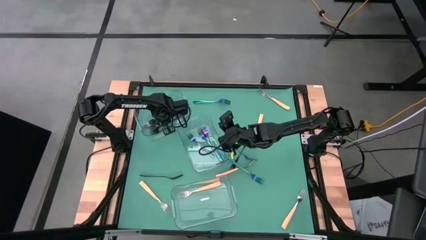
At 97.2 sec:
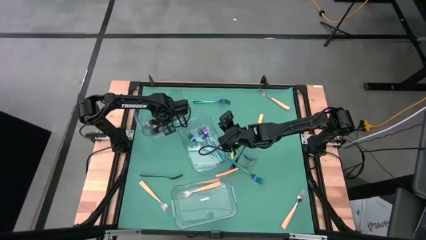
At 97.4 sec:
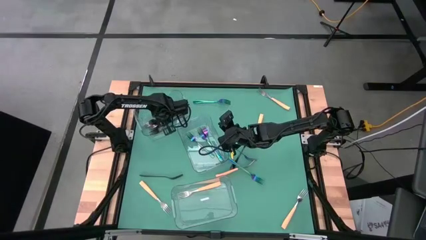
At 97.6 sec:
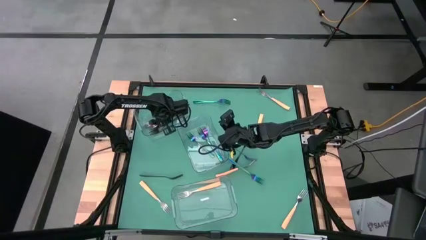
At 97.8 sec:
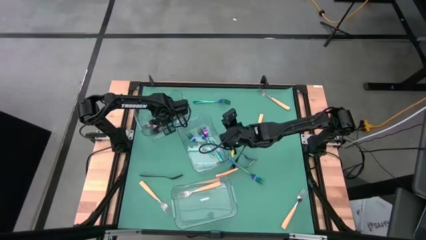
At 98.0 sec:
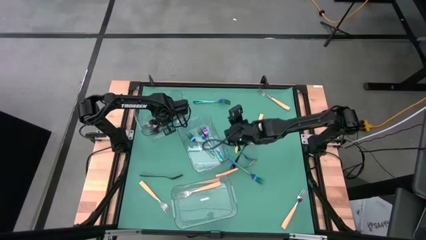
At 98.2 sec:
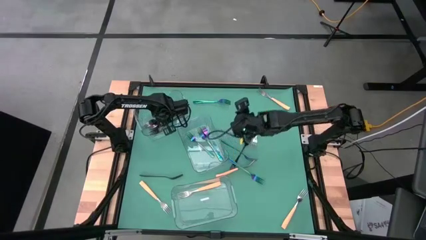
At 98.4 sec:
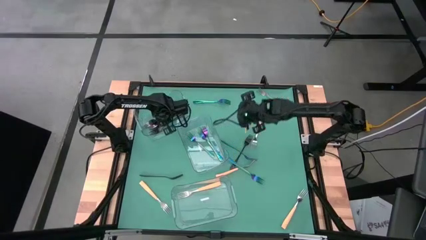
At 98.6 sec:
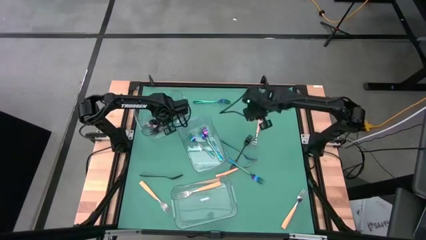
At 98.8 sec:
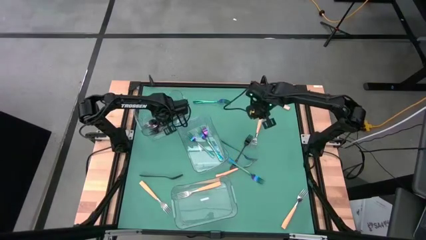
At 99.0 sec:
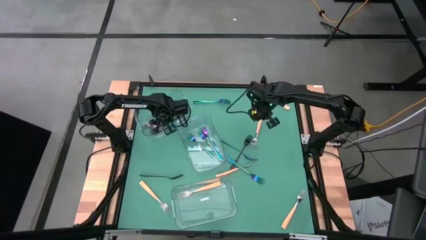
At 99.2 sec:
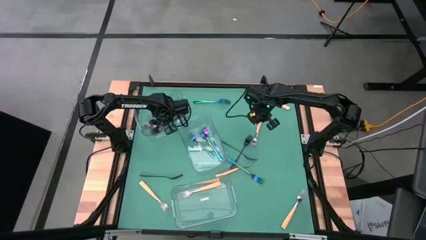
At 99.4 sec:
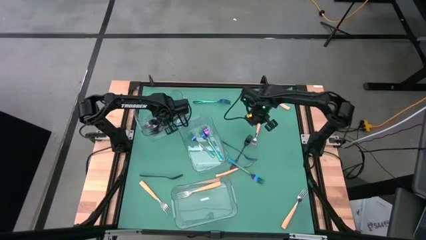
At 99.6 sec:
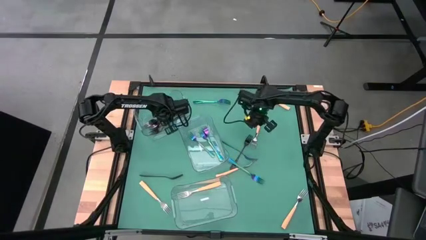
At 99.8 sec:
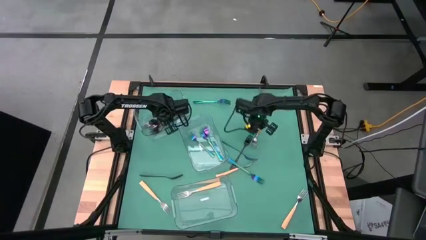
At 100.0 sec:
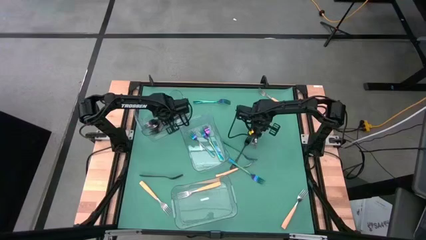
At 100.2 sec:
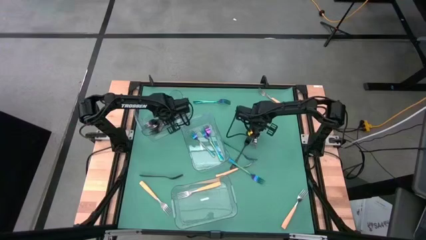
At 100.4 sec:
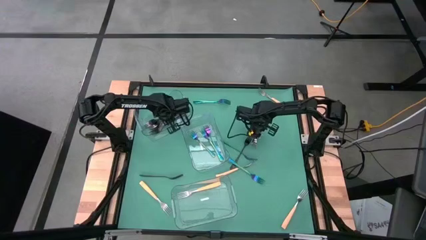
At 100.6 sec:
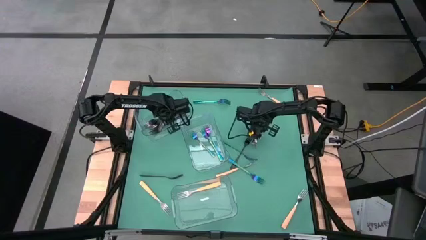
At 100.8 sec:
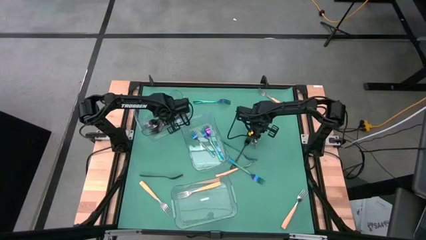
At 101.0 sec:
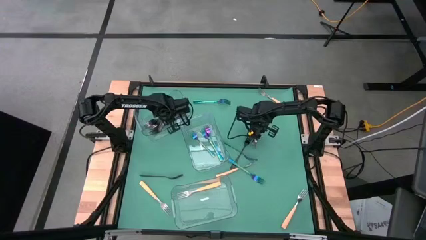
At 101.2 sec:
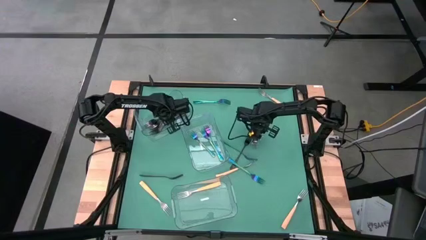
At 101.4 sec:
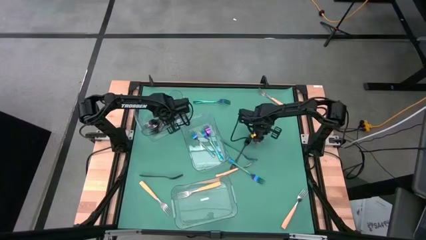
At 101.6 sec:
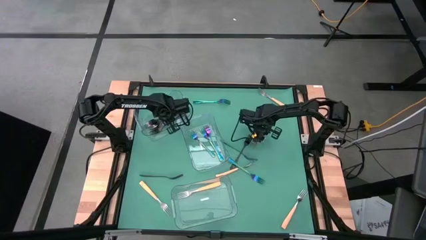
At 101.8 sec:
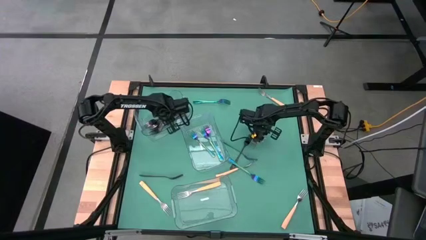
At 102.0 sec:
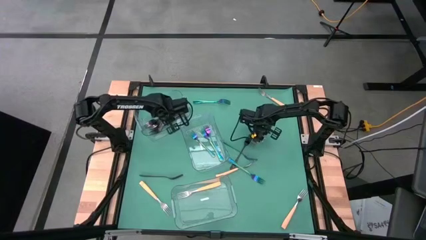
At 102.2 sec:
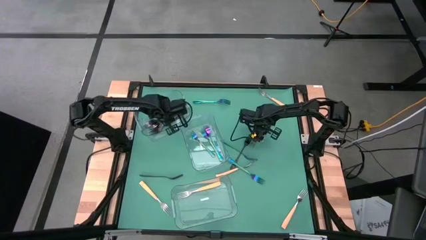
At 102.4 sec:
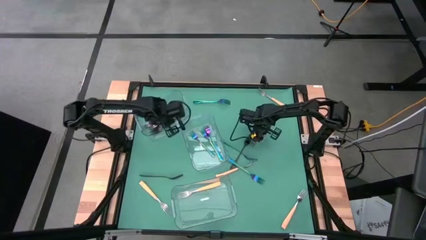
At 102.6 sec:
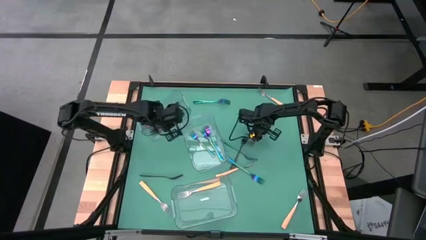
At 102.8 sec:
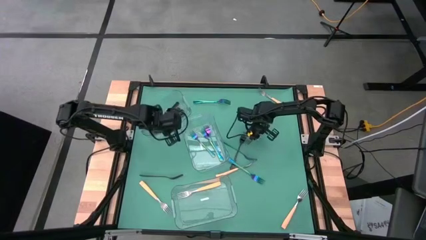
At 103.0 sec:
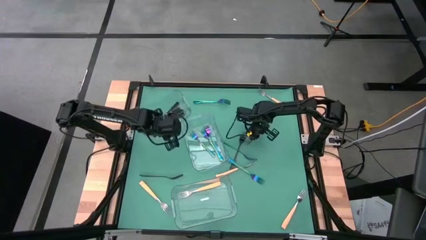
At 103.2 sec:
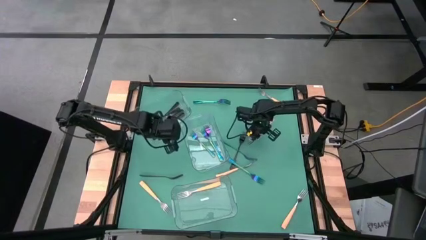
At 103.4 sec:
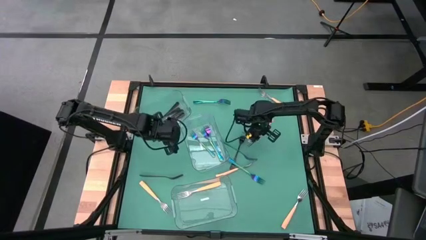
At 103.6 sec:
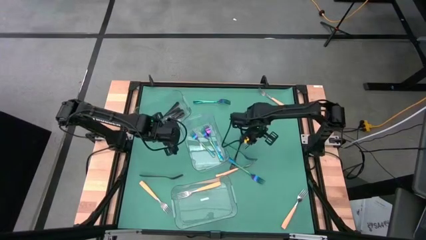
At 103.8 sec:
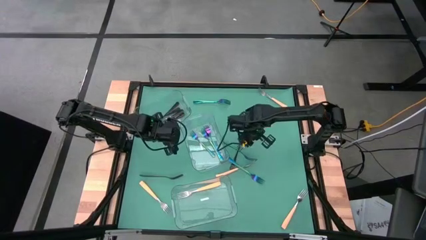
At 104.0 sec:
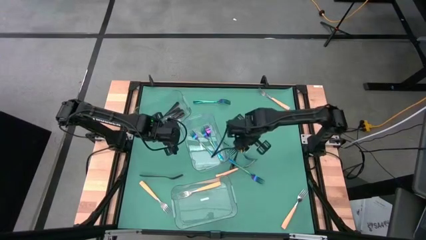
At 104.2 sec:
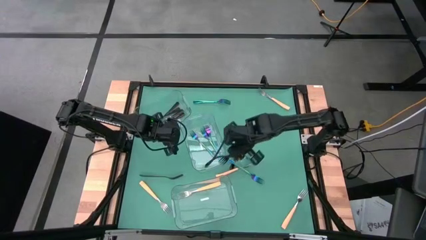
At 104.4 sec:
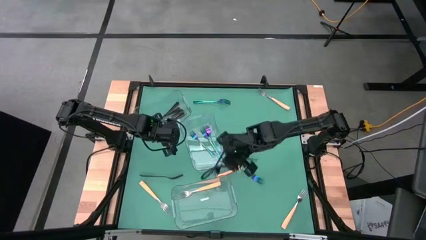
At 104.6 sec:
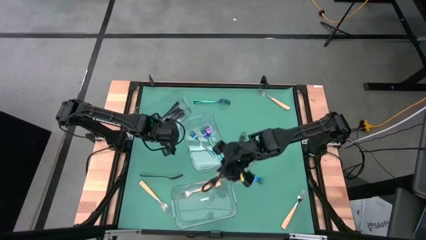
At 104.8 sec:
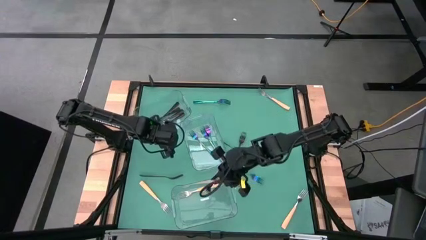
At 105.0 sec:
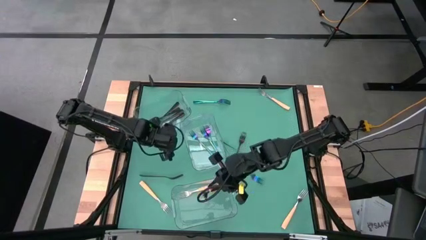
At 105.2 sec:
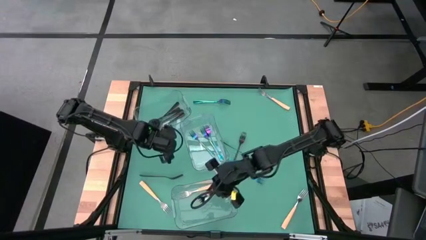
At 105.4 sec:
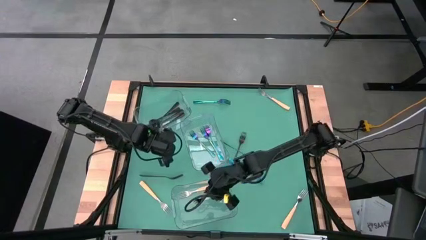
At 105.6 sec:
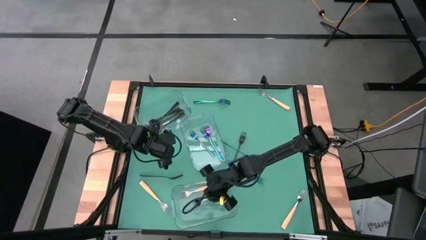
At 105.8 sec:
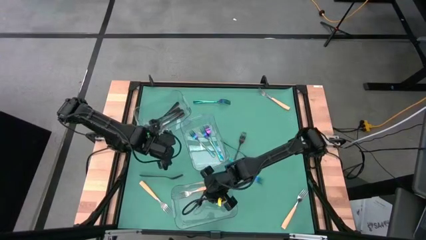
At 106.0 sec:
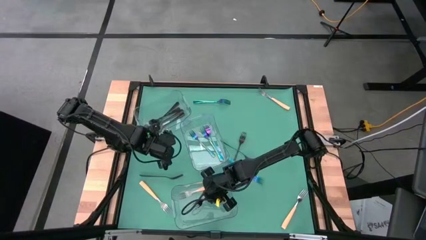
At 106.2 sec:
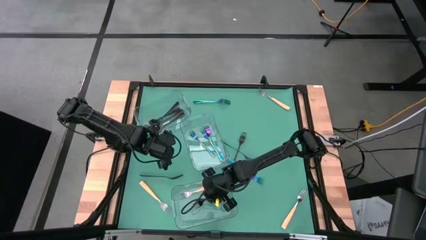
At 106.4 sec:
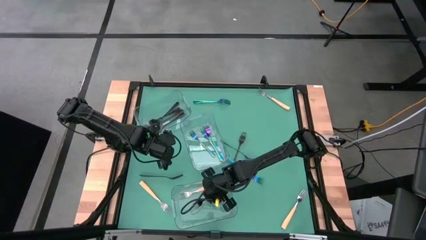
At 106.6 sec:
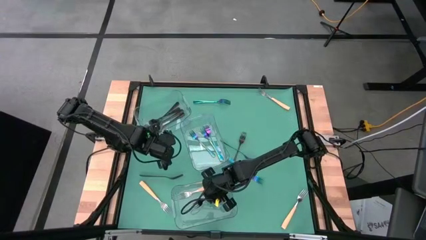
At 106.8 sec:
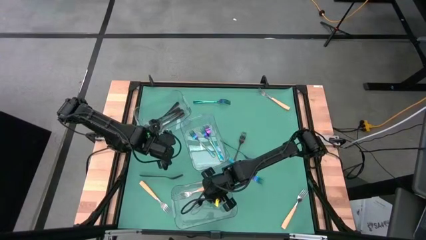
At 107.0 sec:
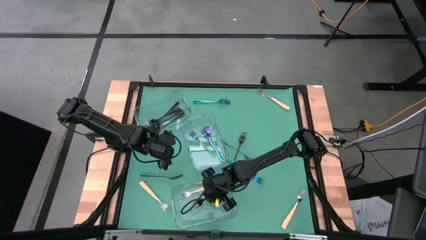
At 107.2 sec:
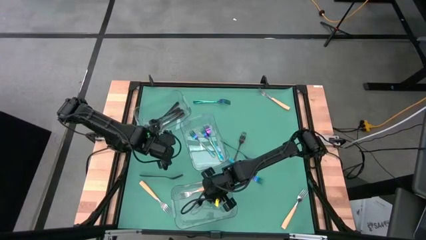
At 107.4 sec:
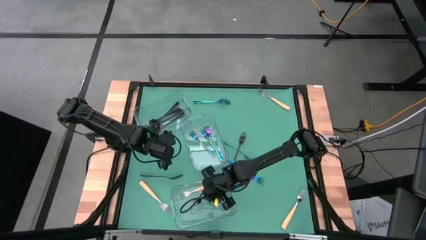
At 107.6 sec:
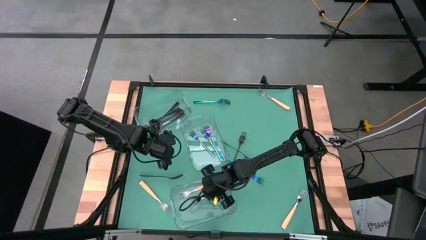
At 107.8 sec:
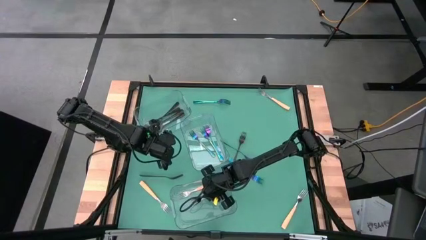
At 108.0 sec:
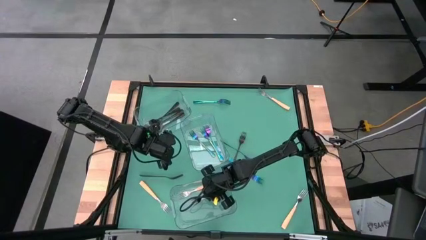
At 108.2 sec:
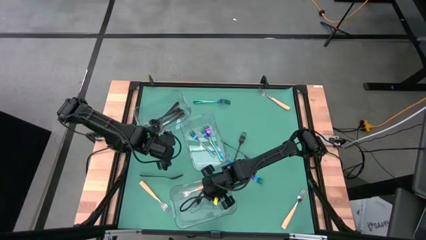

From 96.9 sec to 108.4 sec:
Task: Sort silverware by color (type)
Put the yellow fork into the bottom transparent bin

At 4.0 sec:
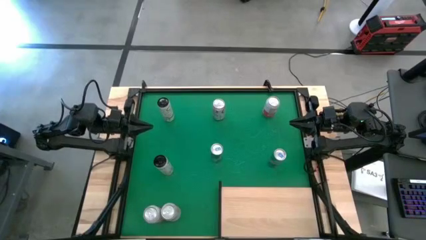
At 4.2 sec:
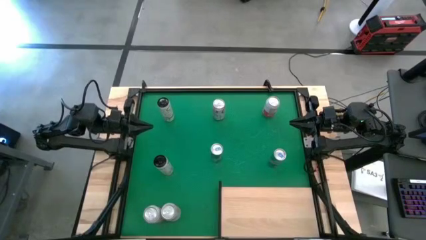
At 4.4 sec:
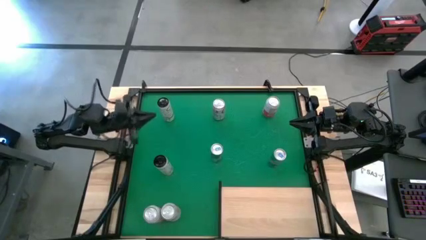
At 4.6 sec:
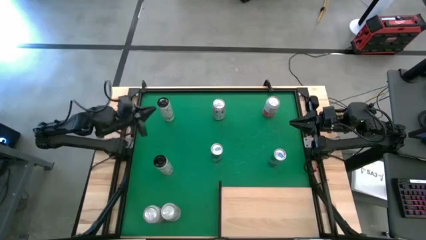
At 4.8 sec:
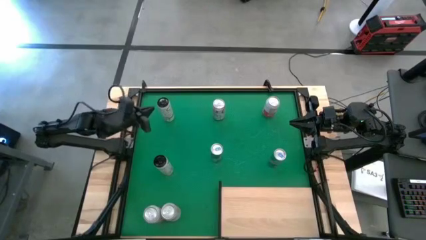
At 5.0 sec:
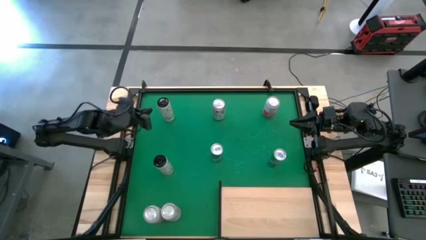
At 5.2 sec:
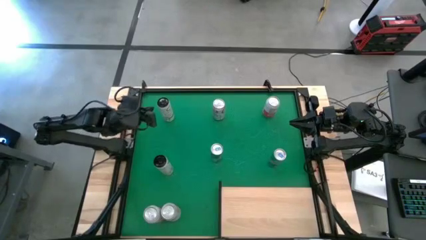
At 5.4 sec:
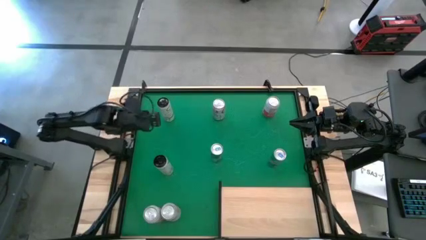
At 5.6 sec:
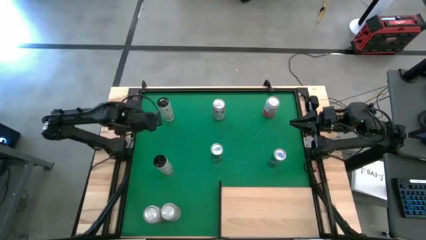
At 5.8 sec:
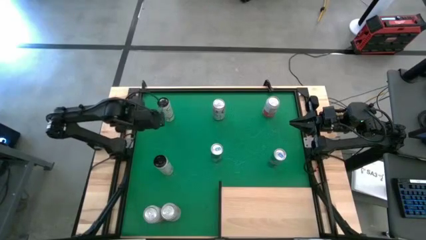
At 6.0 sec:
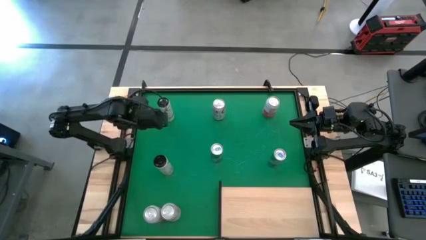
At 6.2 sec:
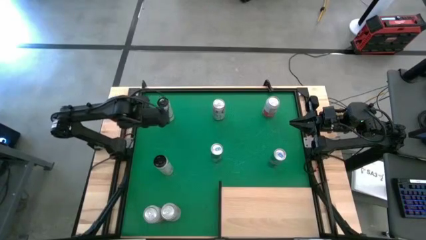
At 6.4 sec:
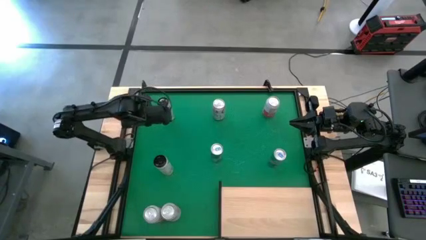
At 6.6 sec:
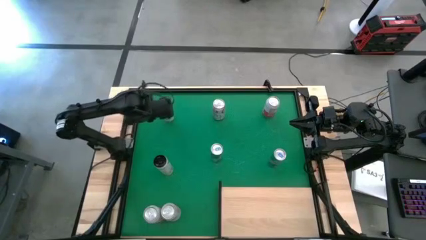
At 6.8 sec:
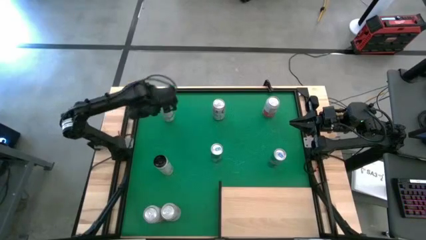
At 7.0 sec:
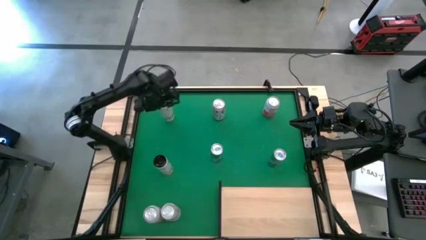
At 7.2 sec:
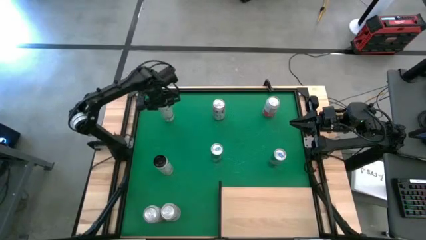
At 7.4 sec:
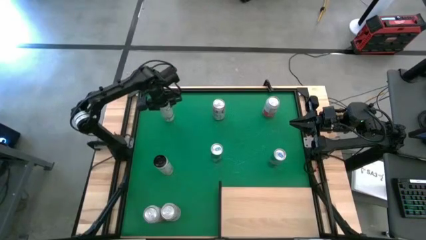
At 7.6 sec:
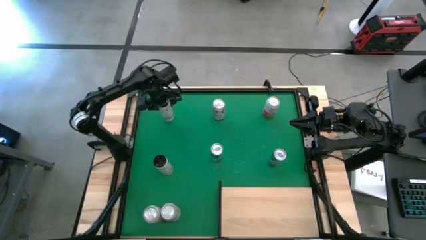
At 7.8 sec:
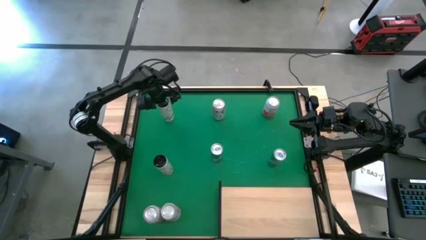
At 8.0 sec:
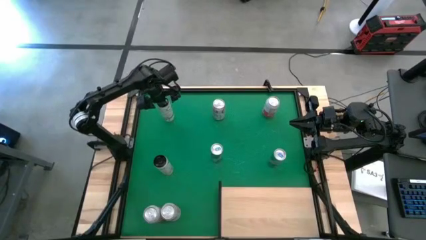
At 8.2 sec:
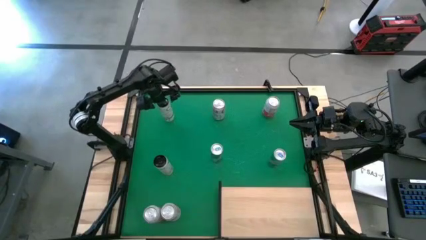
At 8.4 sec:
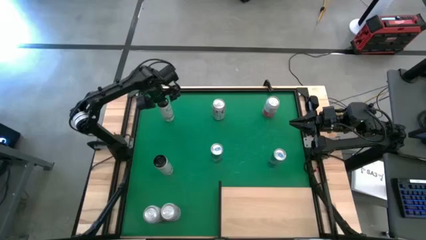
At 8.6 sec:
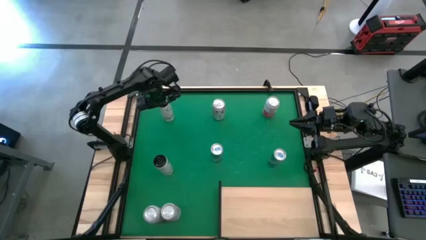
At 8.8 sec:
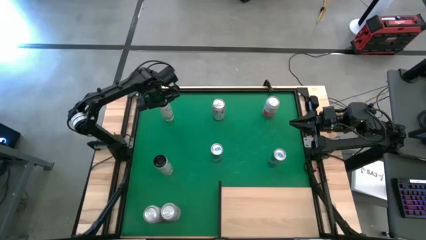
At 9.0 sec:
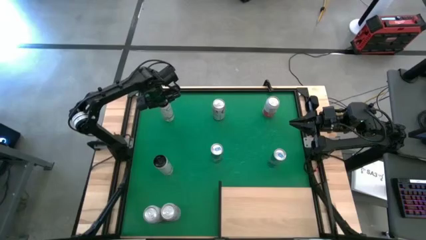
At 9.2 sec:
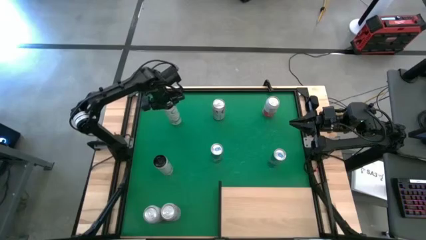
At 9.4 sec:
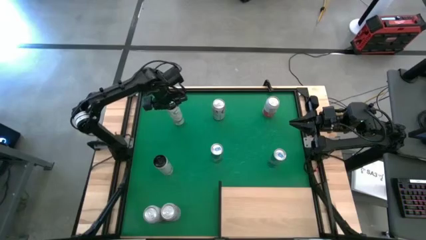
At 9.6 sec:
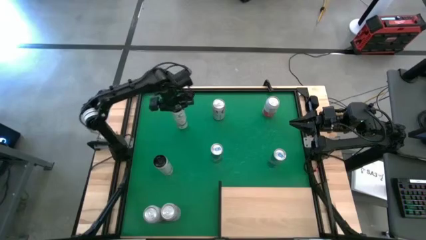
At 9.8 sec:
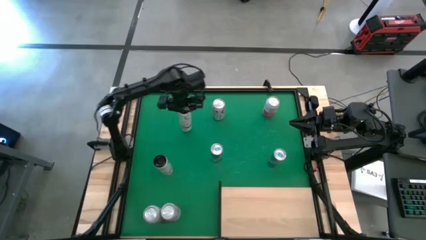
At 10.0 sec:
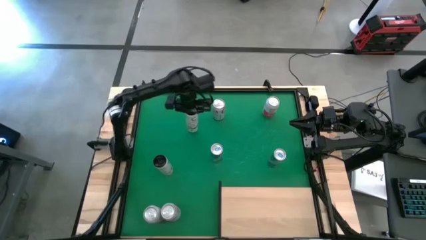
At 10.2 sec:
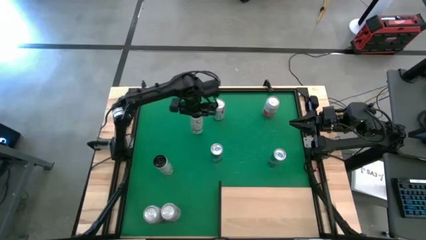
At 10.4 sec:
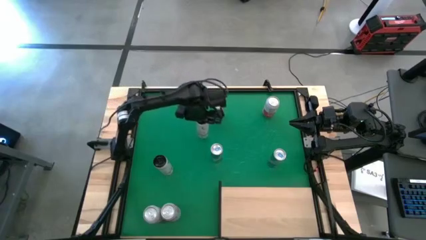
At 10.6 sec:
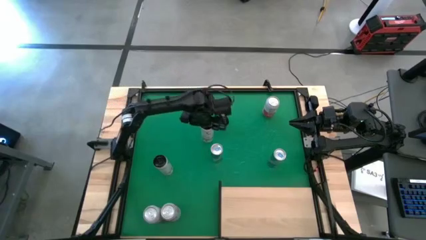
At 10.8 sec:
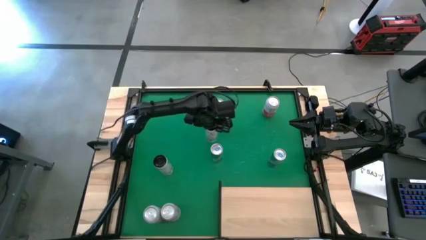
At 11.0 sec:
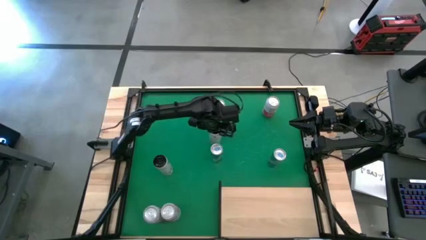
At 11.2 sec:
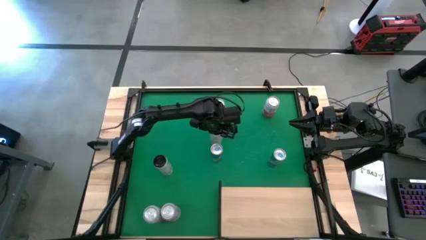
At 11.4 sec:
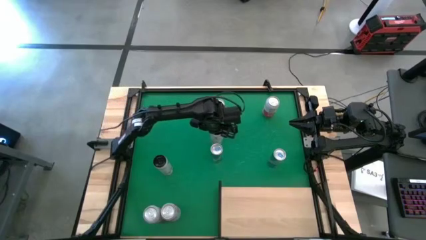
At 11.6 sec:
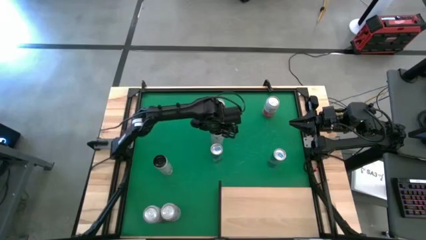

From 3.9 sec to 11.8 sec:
Task: Place canned beverage on shelf
Move the top white yellow soda can to the middle of the table
